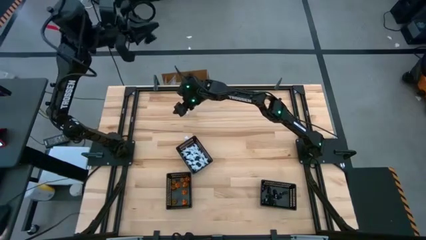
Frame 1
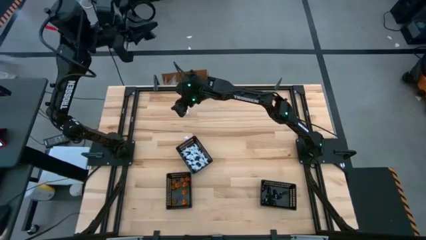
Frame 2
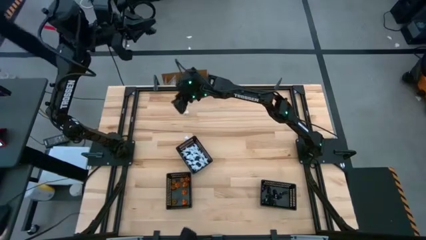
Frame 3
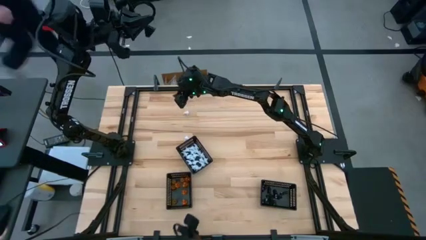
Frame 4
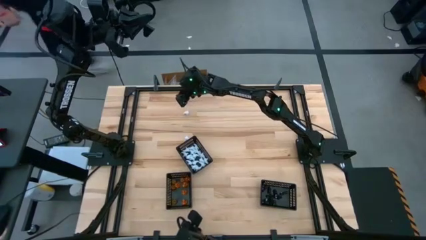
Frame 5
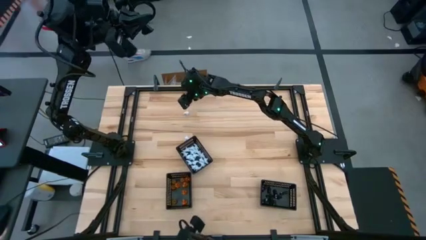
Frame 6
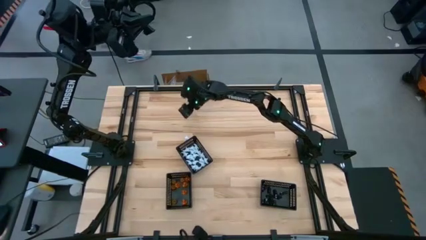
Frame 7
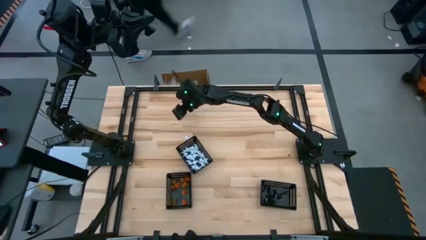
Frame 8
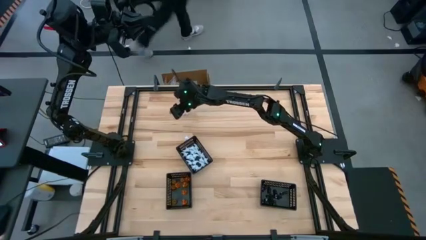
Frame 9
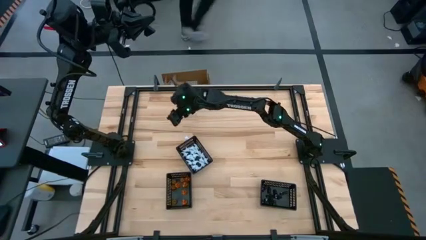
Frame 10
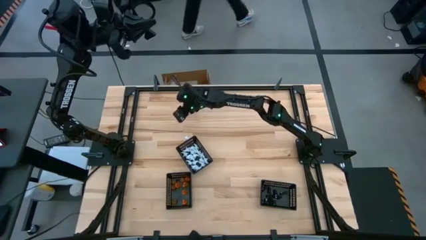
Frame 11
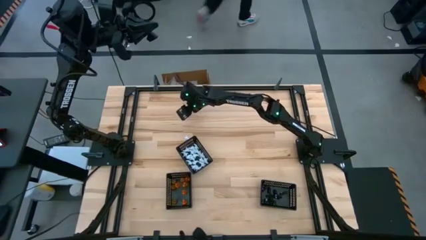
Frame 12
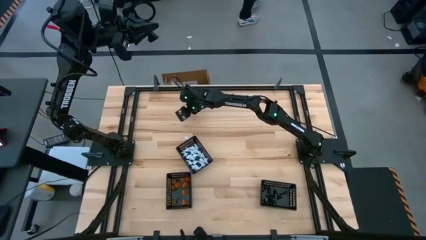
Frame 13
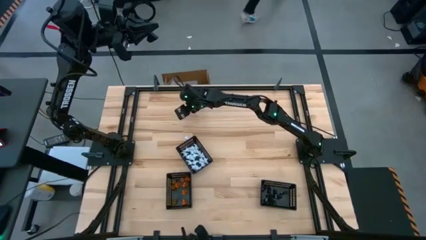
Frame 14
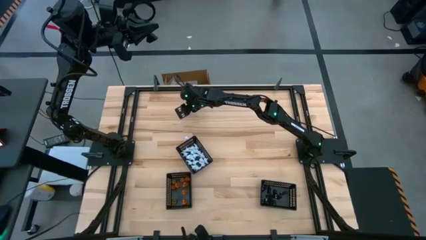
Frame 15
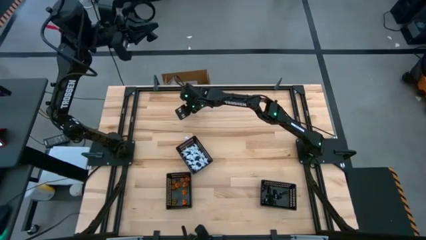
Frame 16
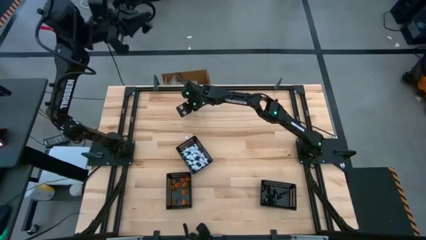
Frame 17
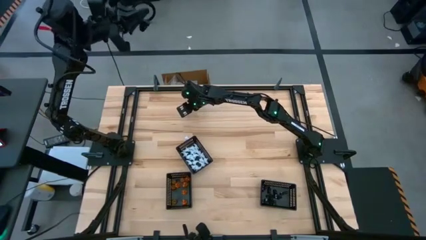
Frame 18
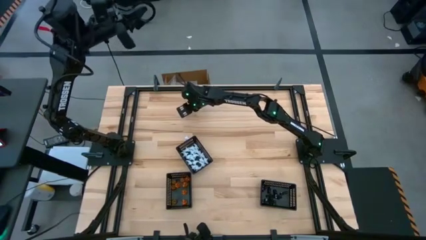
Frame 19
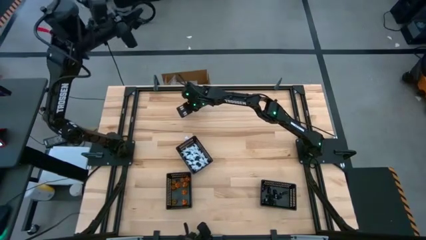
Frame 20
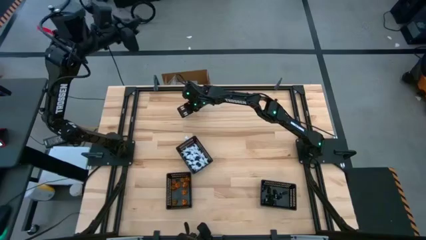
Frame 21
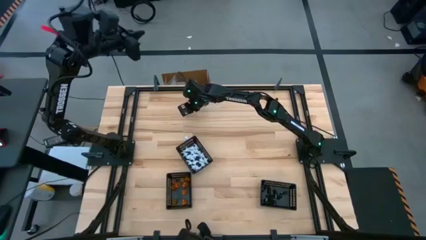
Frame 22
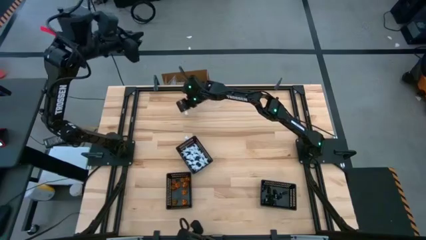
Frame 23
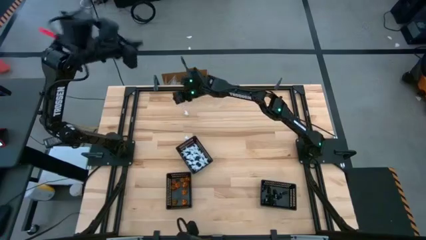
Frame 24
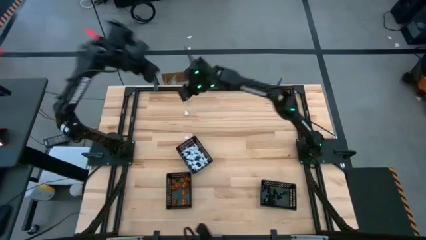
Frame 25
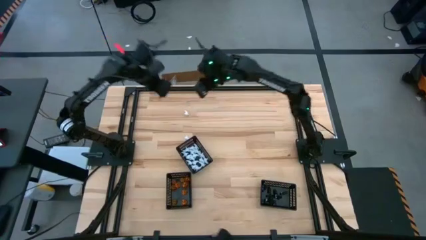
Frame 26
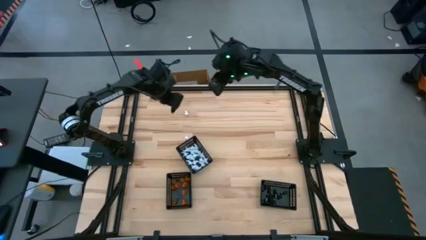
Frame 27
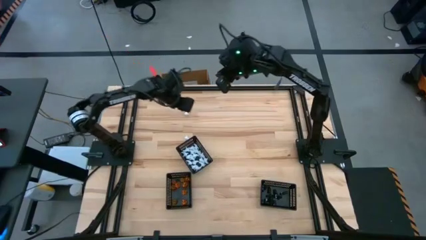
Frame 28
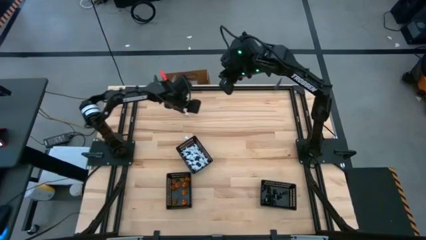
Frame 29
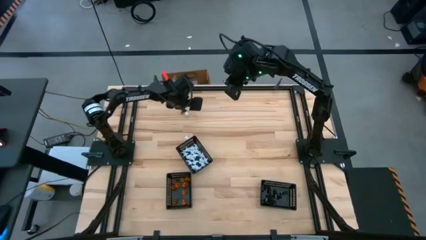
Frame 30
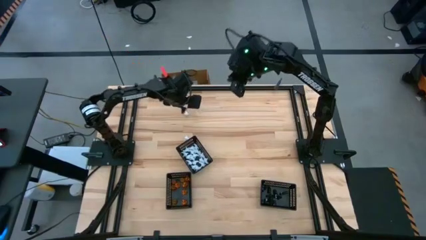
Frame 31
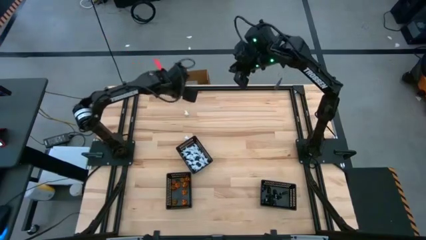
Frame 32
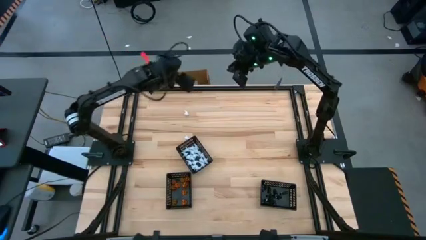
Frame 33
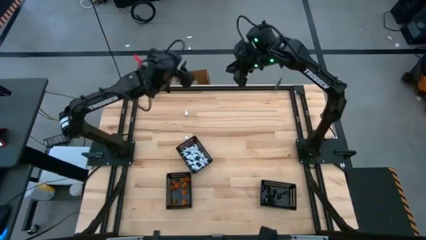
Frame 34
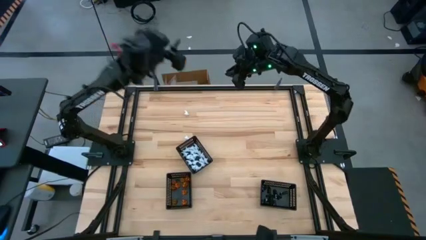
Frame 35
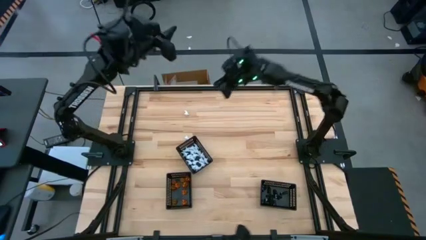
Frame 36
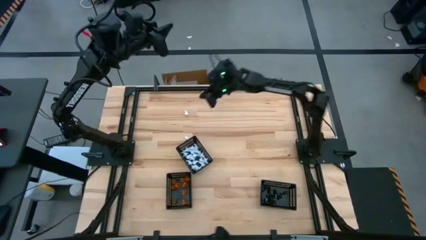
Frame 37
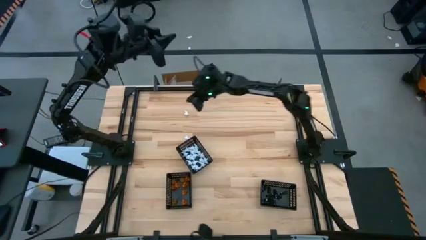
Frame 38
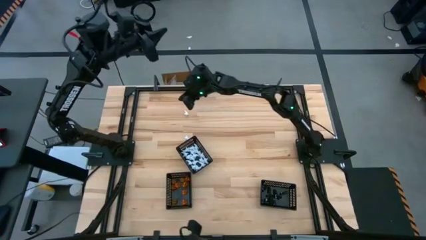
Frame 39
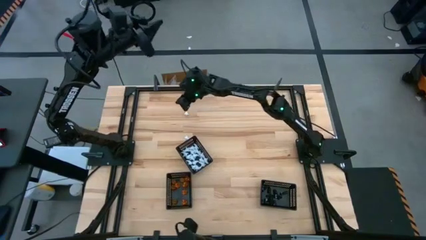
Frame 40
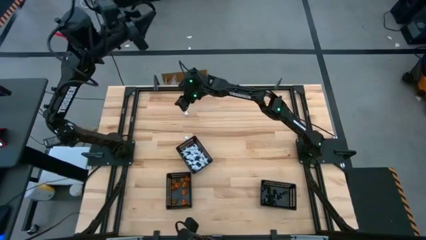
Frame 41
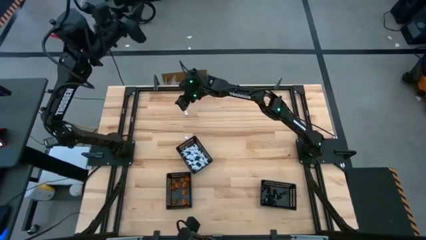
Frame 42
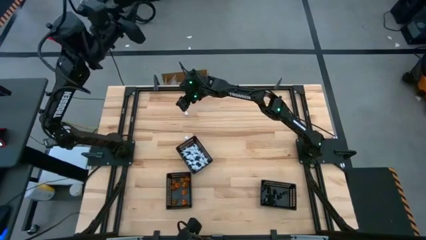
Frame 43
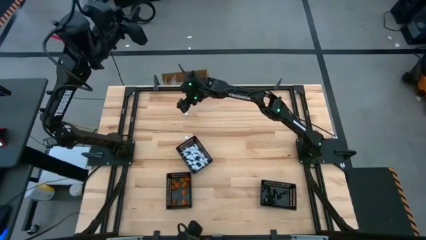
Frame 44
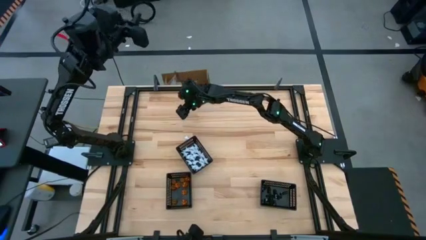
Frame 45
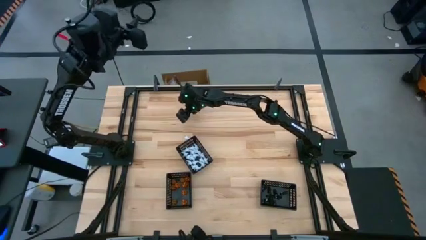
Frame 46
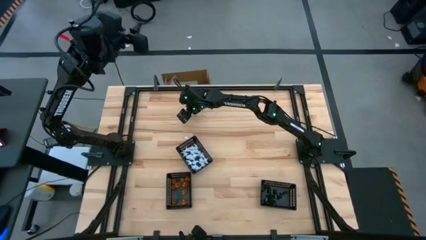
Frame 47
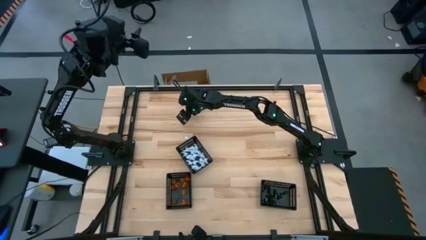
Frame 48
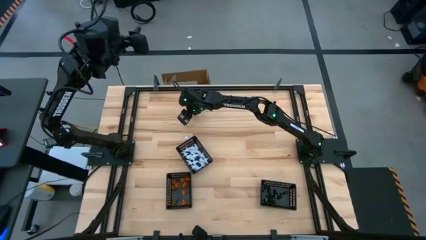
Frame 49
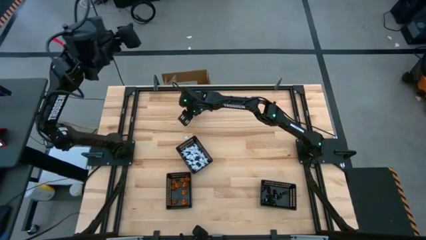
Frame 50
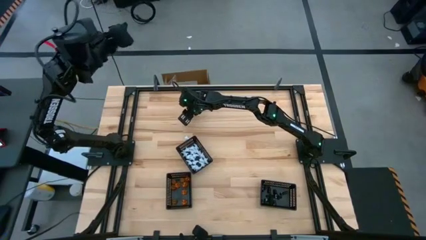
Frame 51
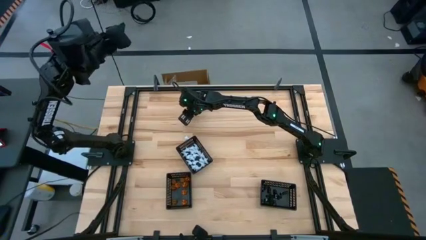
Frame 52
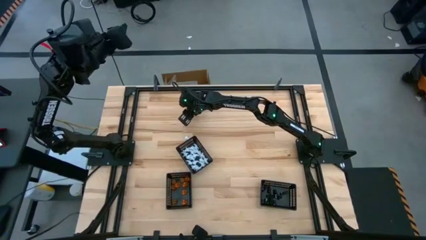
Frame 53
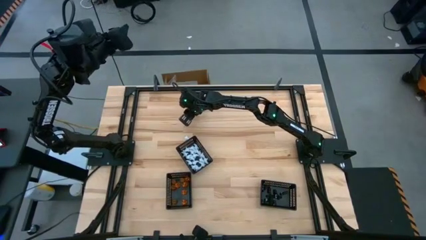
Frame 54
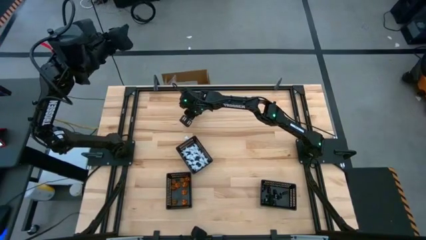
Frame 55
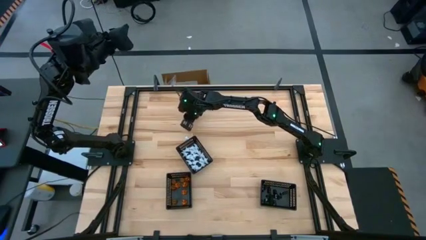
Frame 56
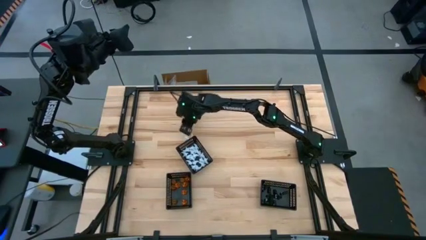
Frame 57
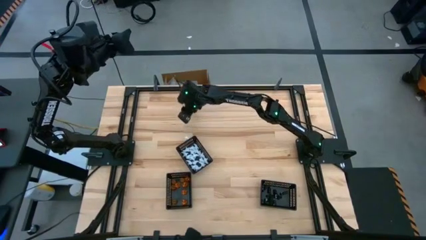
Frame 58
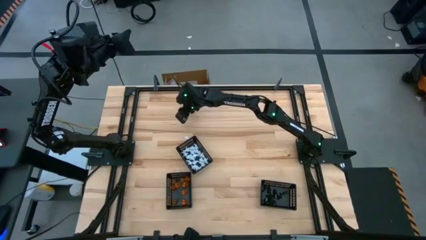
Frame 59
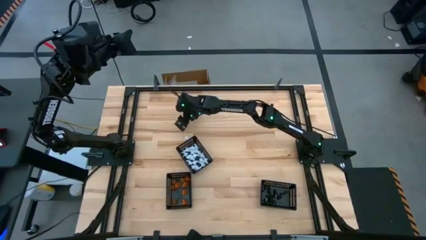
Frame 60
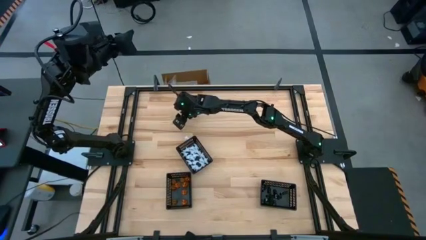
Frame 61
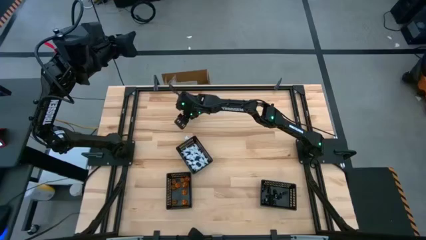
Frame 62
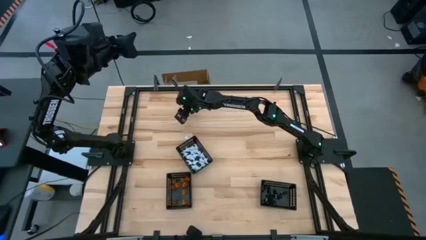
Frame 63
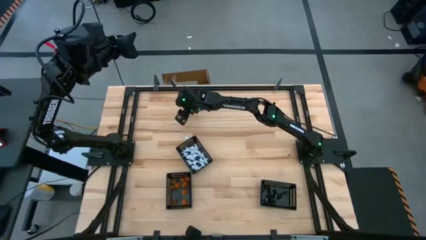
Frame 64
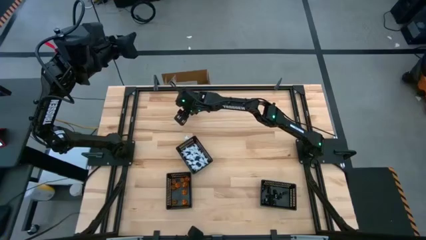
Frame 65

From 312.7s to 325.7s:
Task: Sort Halloween decoration
Put the white ghost toy into the middle black basket
